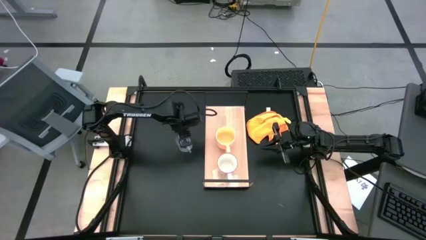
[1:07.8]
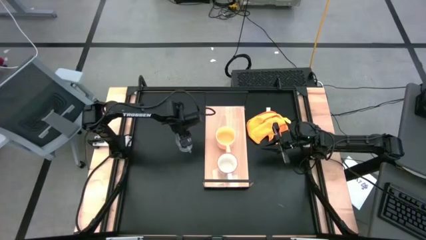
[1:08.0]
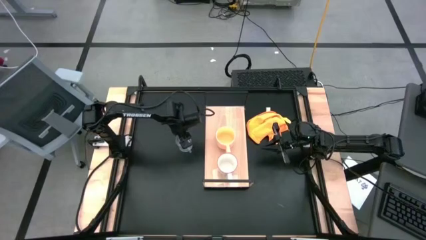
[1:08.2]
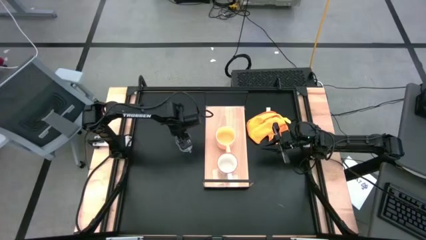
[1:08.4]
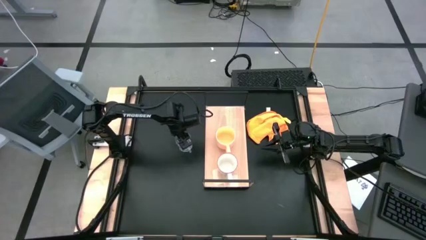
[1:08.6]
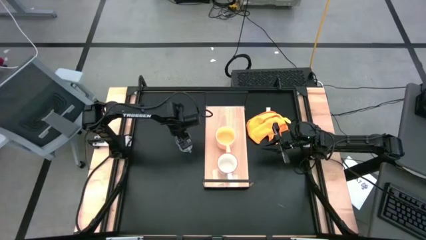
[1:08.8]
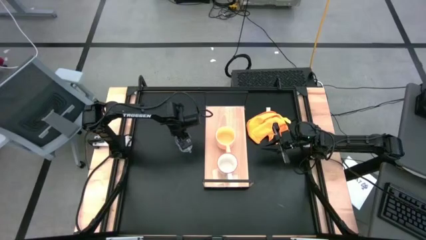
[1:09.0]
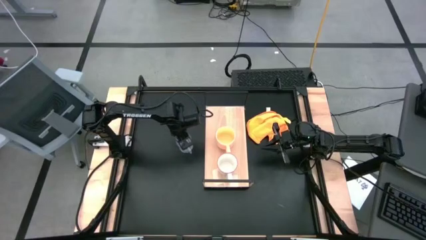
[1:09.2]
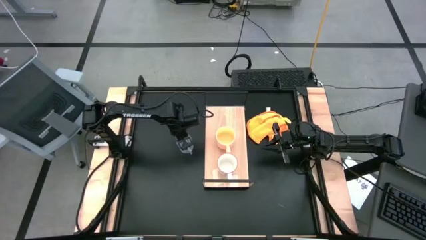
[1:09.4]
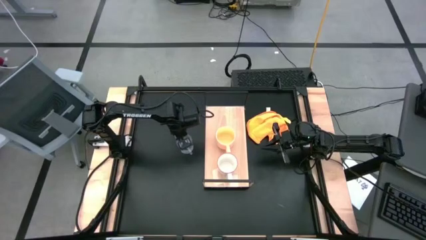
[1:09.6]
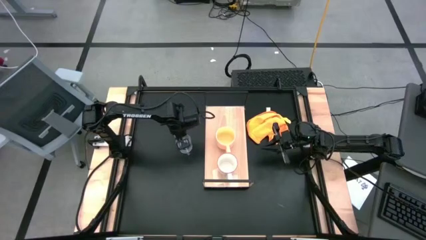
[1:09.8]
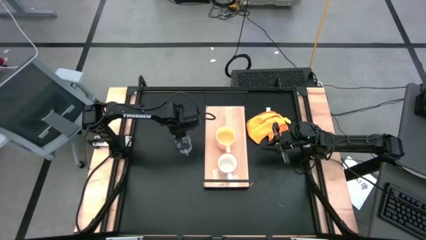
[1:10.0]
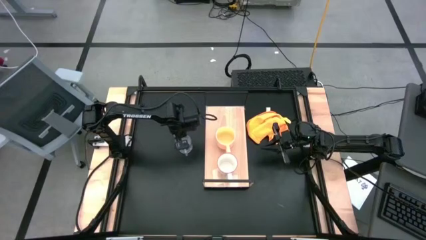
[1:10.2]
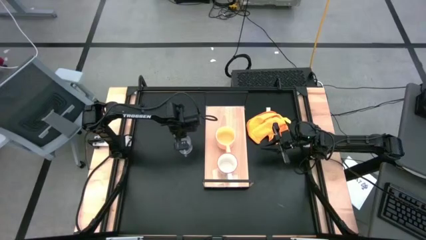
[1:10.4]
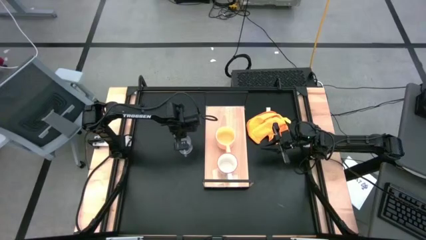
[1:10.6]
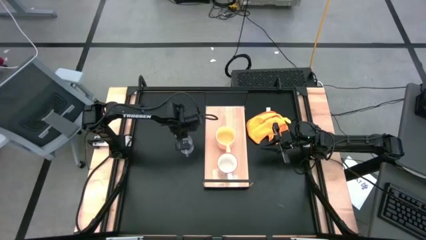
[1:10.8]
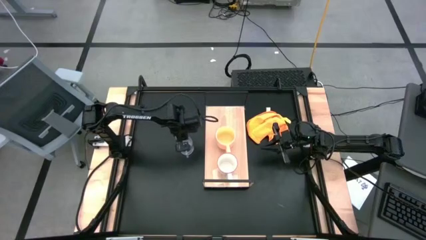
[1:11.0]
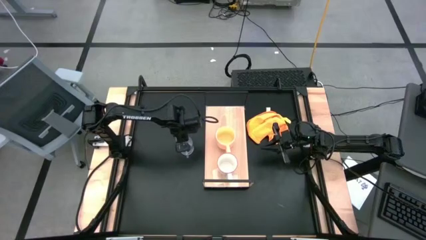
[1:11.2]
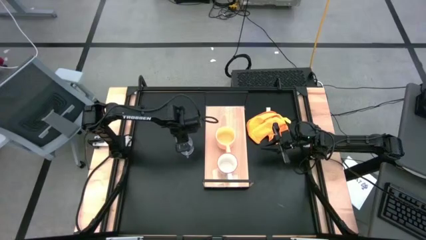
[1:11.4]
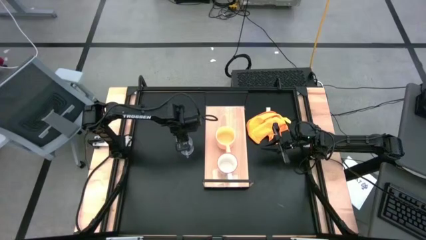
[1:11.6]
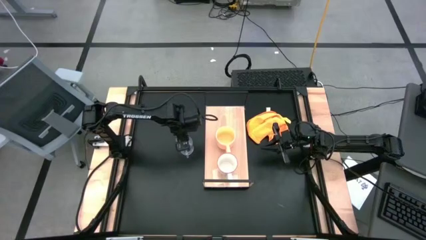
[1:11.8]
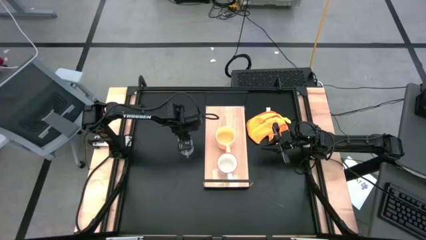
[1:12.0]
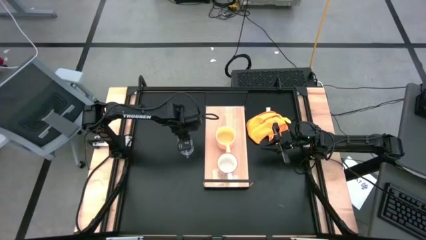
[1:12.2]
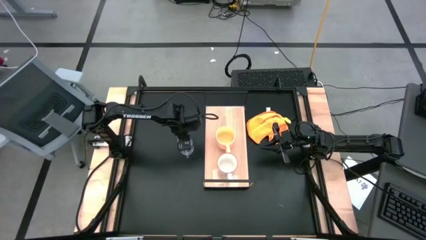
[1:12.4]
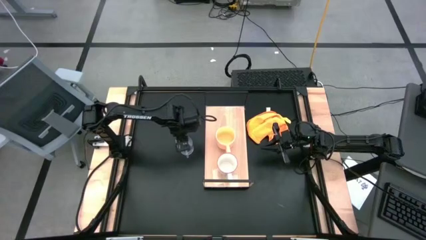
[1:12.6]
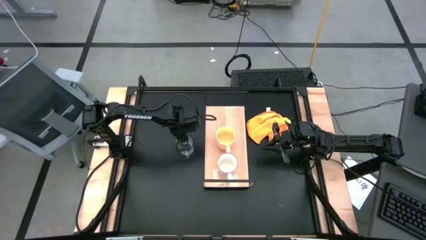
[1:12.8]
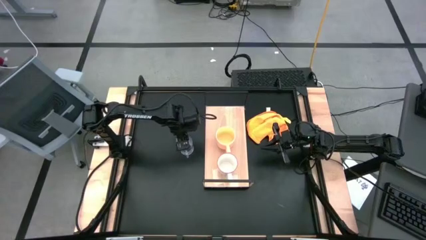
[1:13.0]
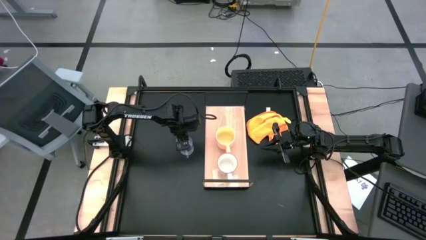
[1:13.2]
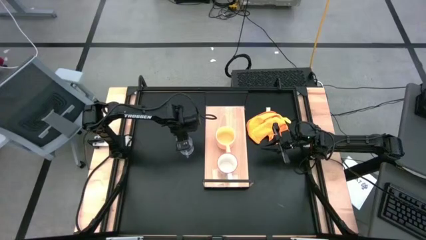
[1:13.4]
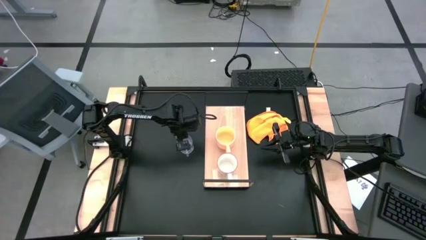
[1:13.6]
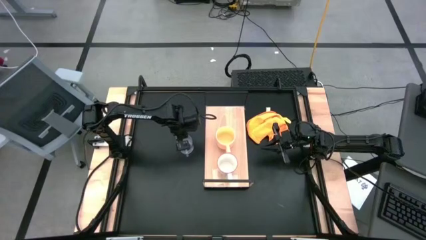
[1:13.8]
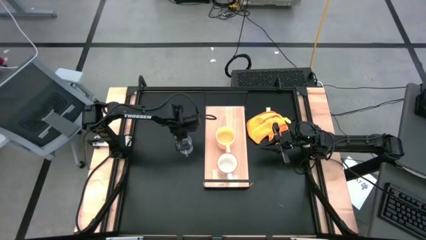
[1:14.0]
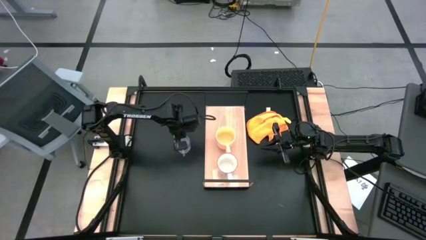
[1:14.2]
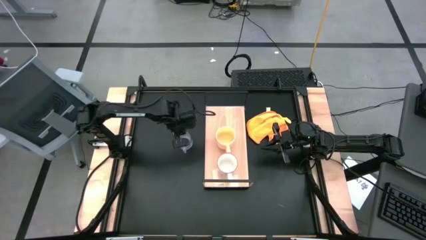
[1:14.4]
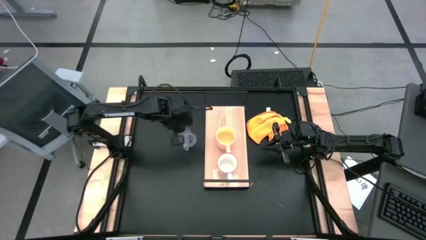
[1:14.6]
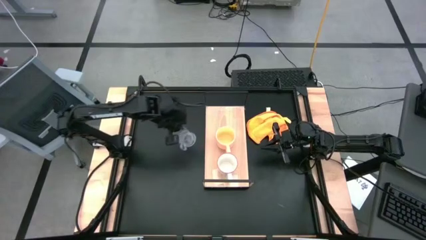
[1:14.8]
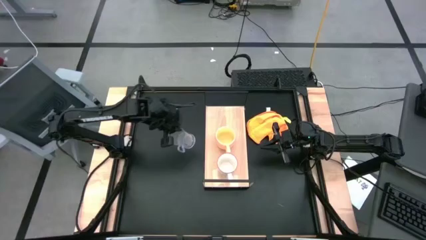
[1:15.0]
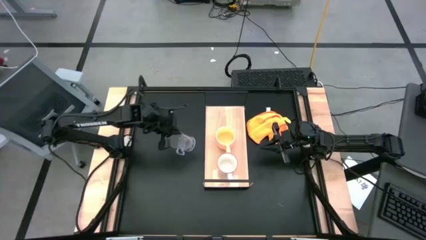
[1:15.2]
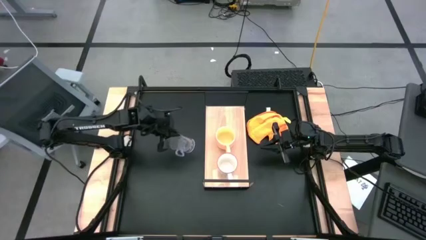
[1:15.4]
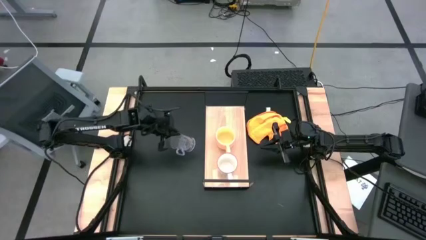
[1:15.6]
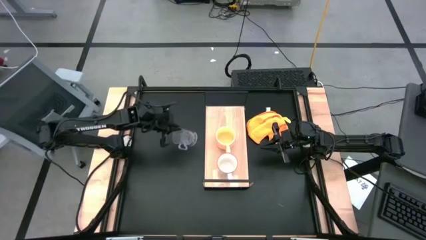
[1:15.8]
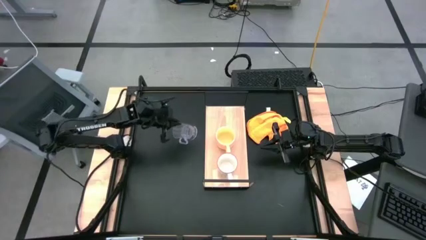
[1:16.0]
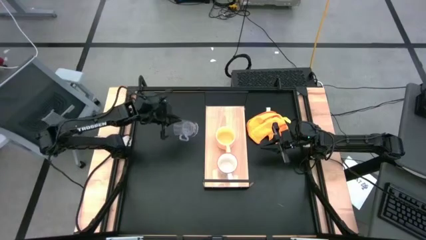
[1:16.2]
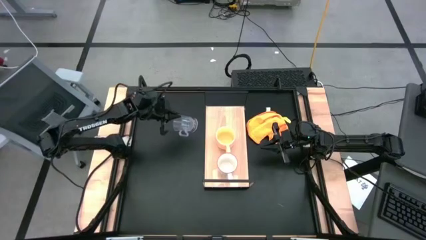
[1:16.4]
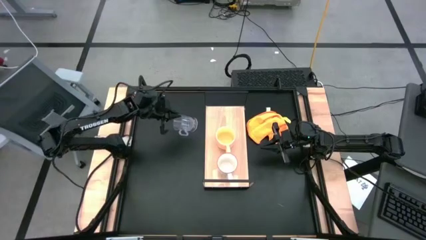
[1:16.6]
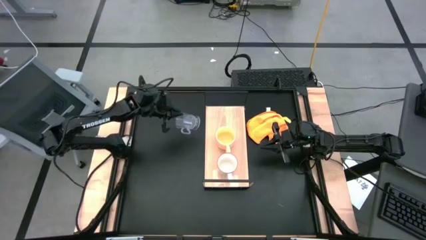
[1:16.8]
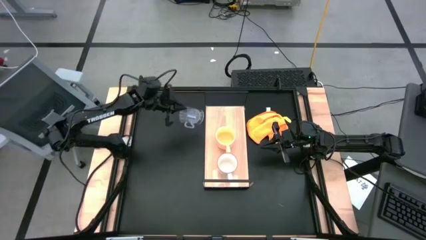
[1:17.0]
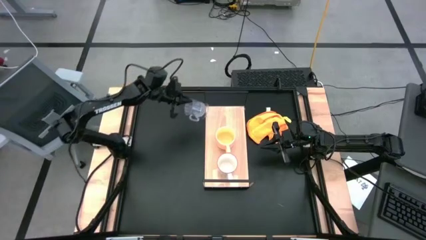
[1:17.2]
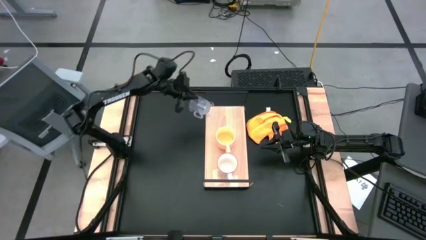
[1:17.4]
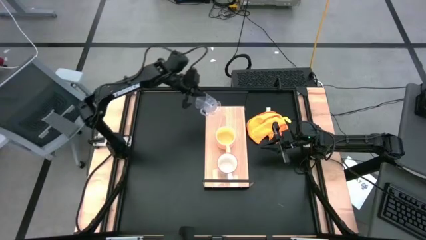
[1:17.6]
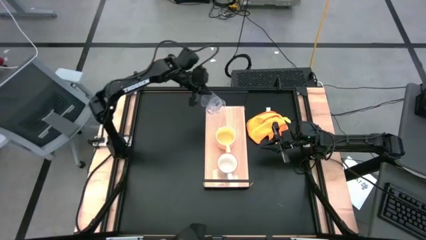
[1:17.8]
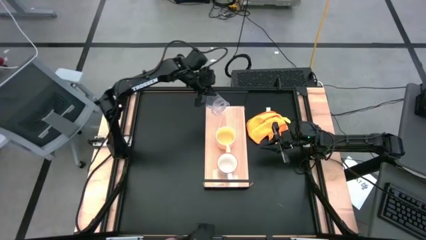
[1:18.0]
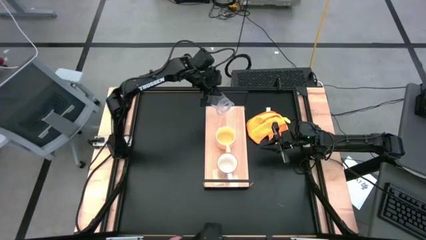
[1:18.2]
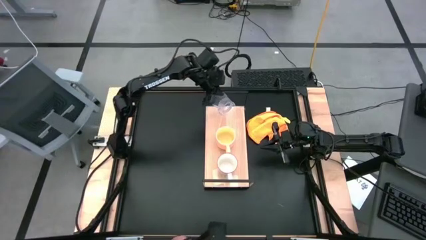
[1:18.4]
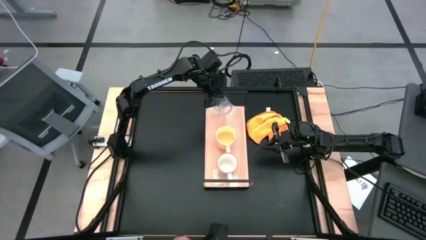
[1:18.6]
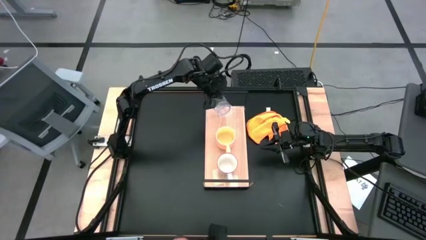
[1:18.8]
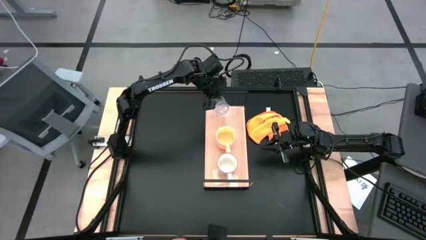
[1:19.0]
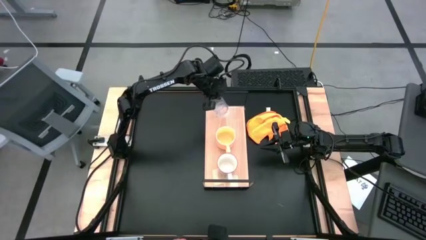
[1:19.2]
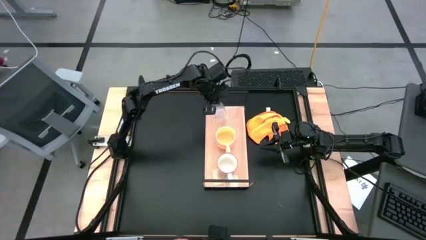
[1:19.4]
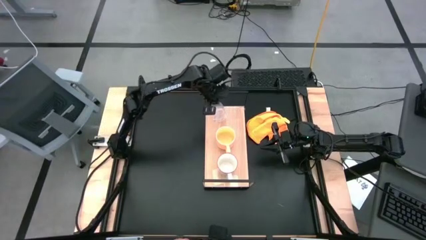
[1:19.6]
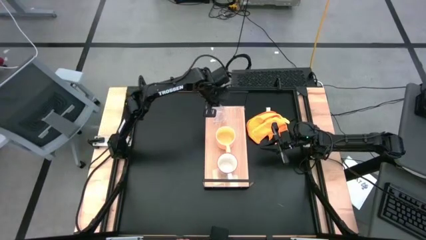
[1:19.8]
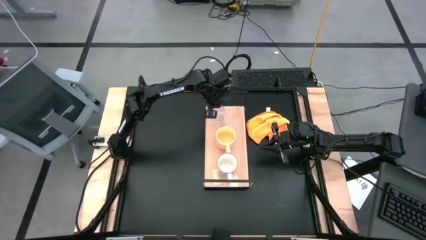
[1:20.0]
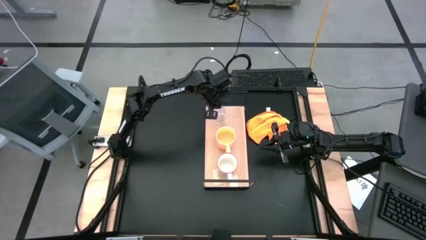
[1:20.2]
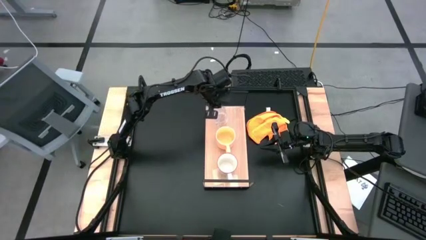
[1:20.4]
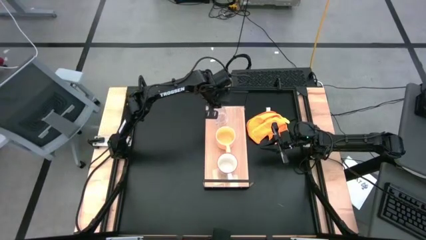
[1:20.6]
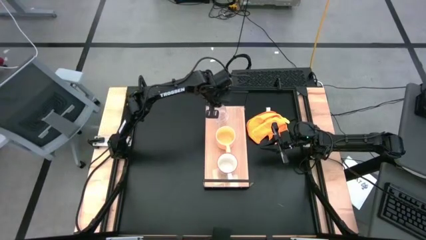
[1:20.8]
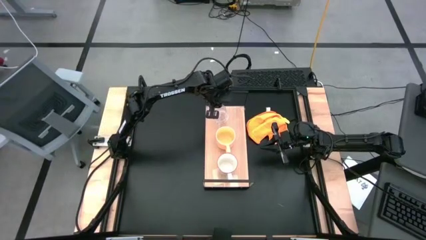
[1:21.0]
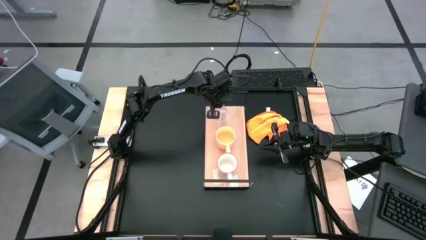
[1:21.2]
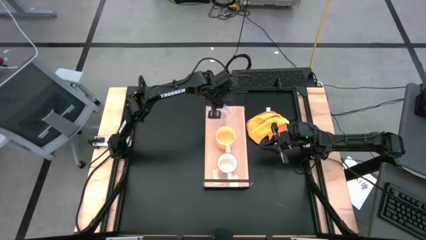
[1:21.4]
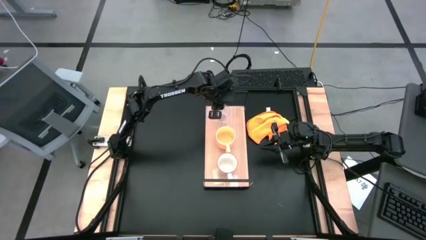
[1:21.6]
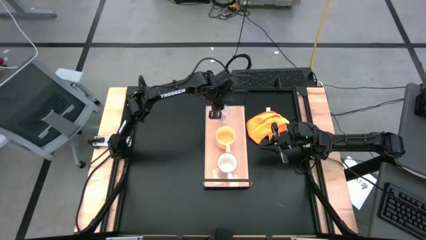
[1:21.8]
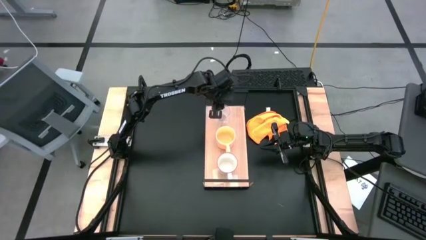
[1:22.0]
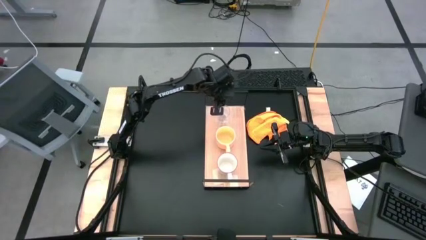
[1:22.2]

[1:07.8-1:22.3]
Task: Stack small to large cups/mugs on shelf
Put the transparent cup on the shelf
